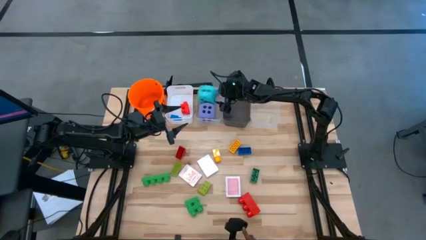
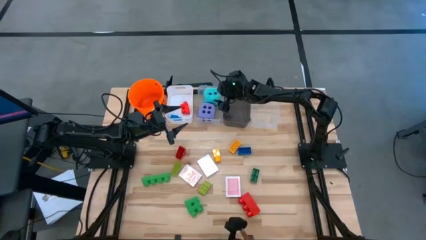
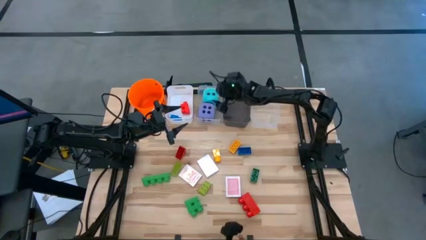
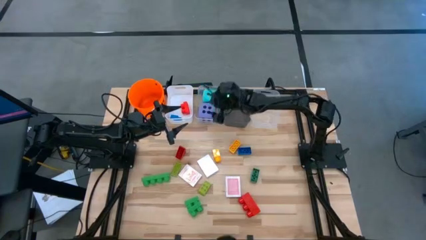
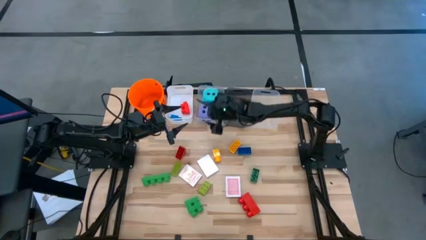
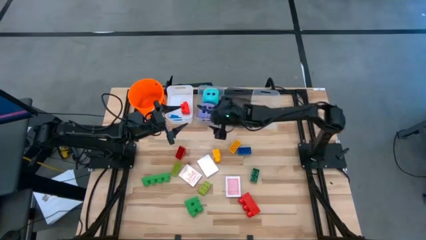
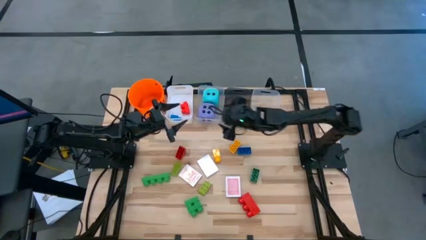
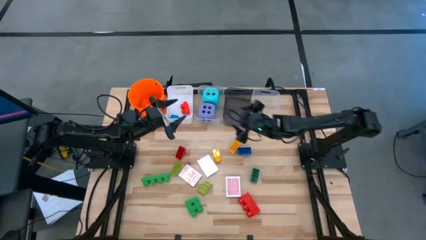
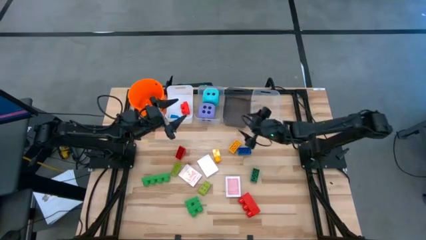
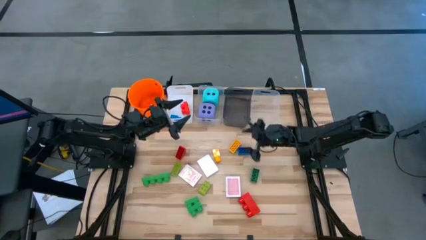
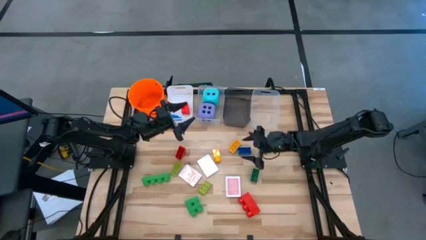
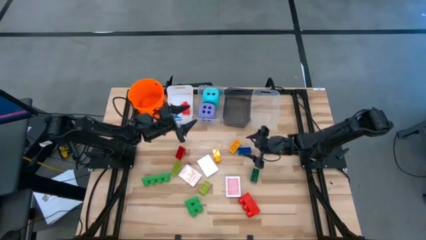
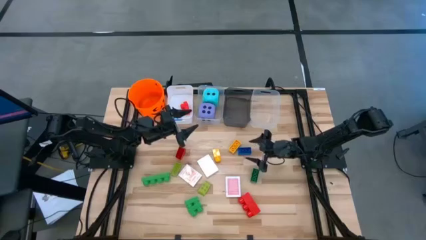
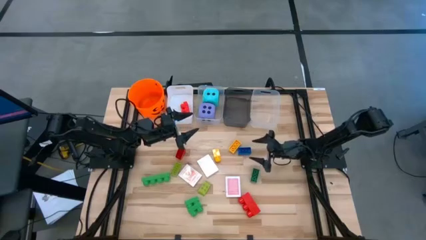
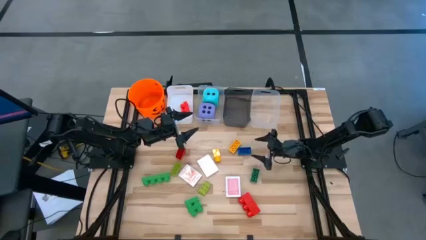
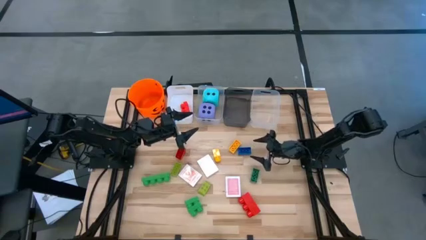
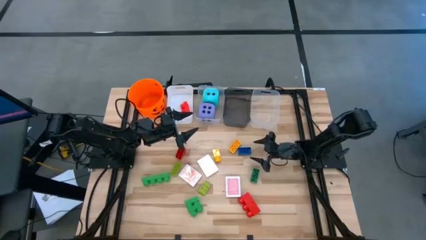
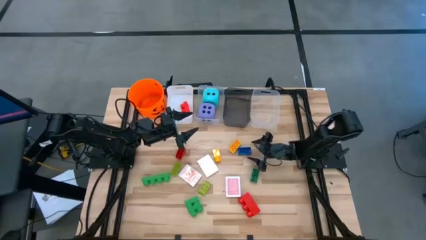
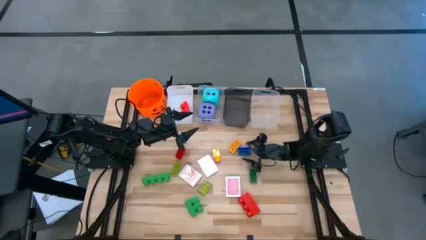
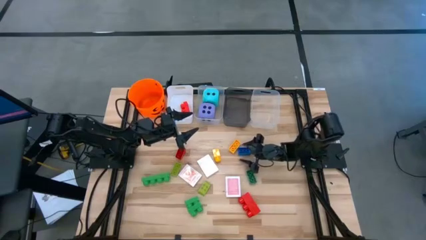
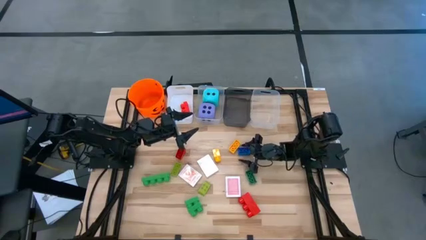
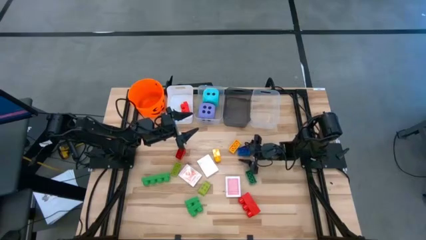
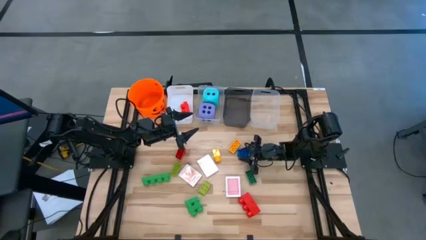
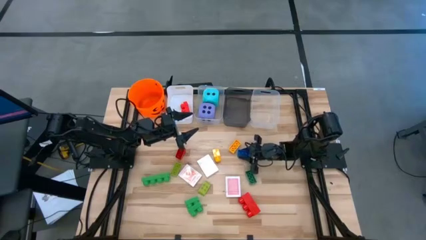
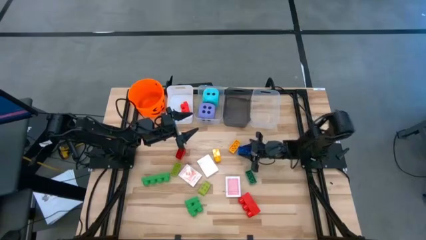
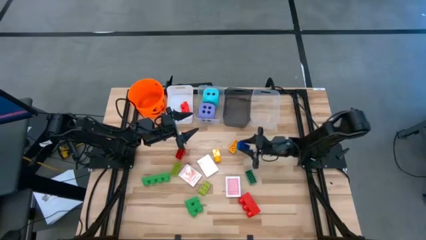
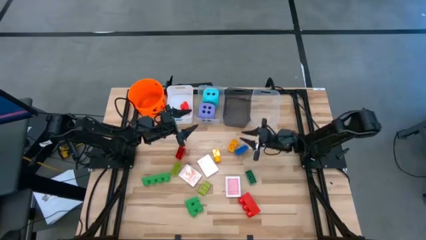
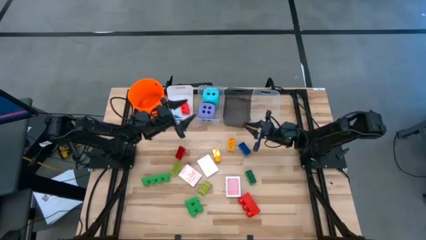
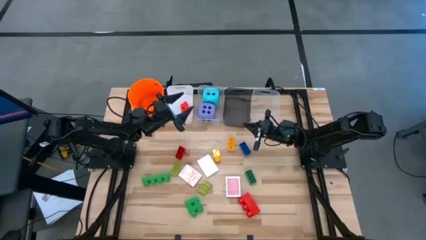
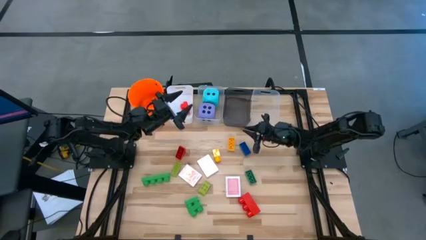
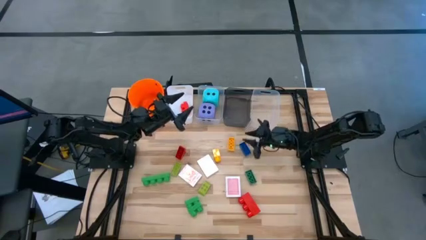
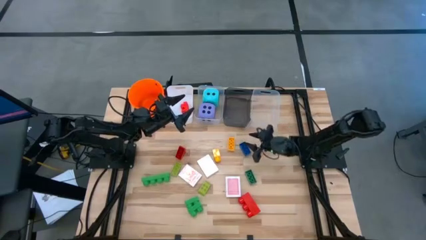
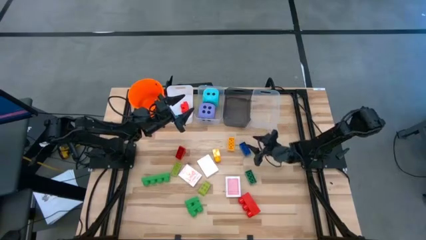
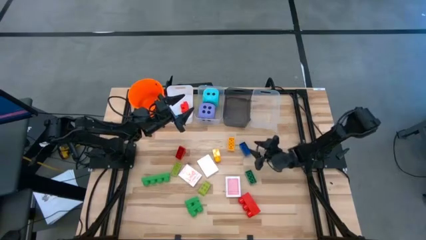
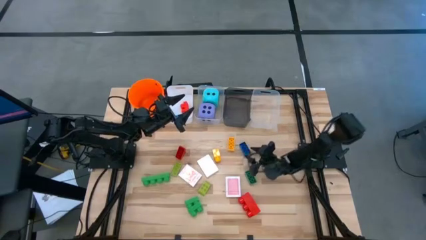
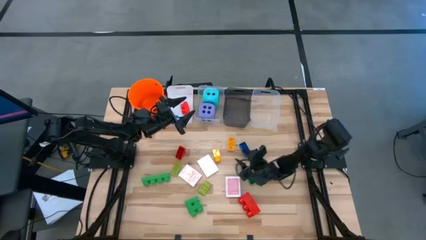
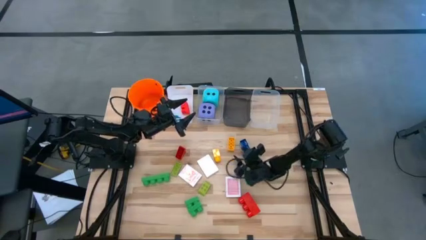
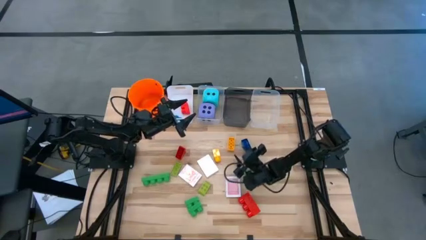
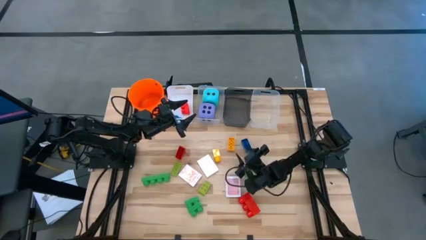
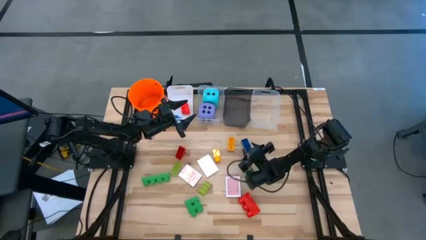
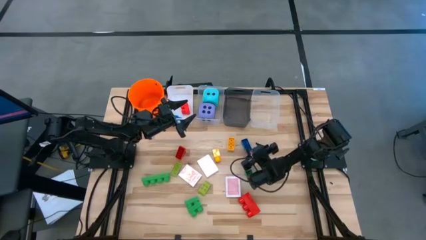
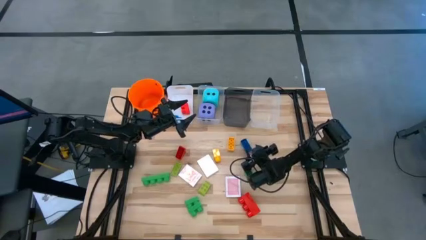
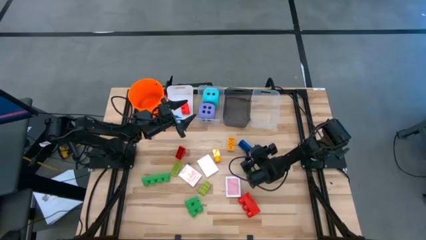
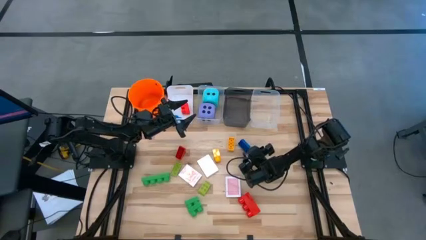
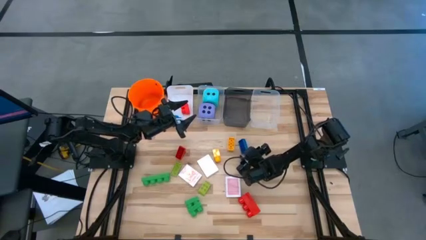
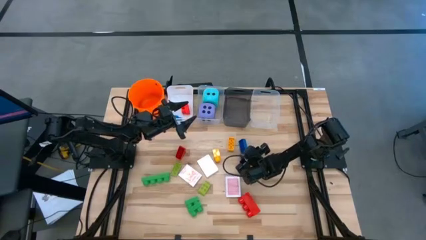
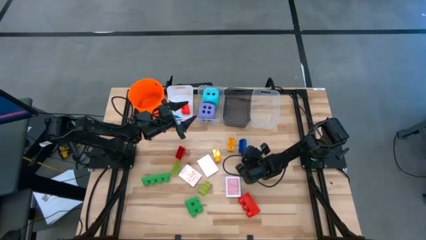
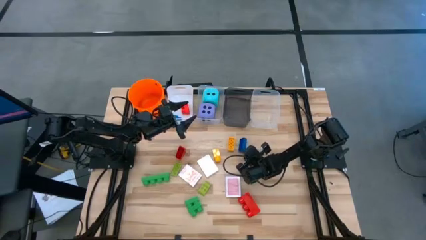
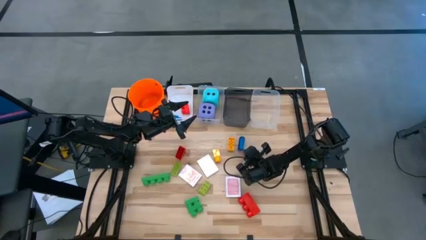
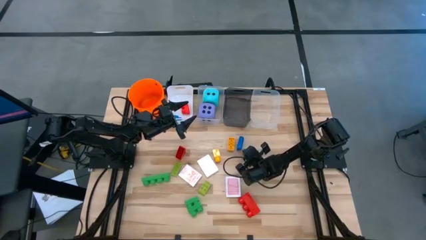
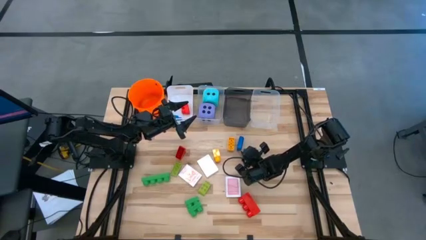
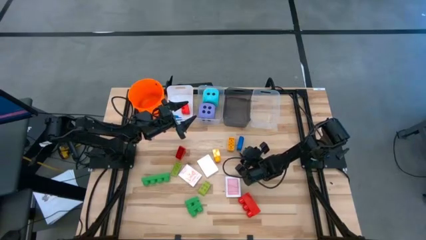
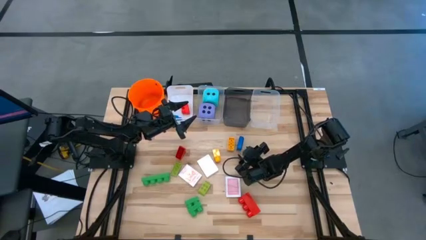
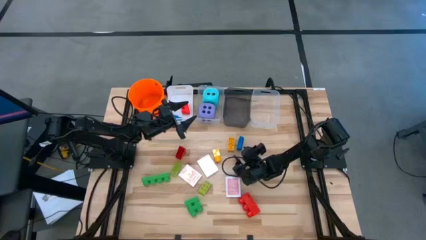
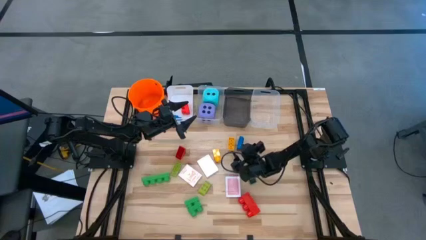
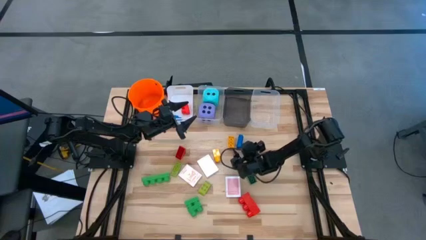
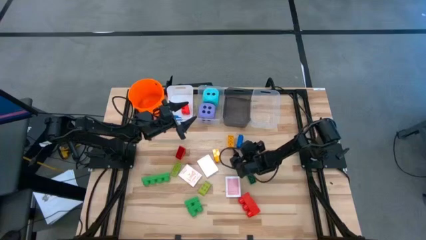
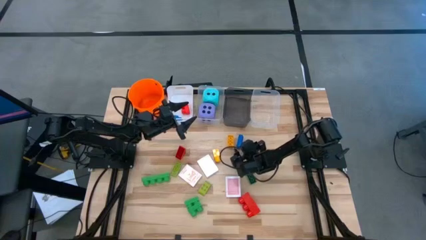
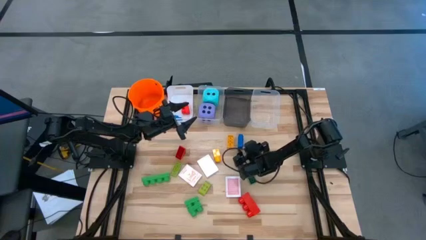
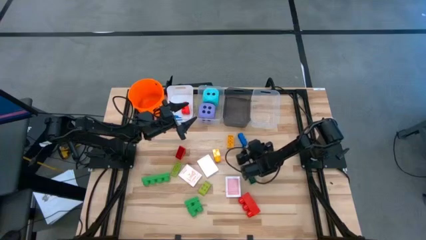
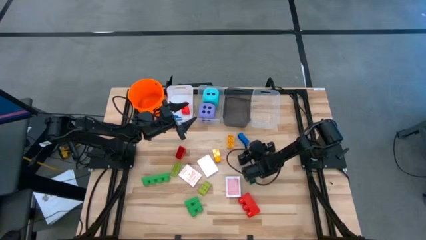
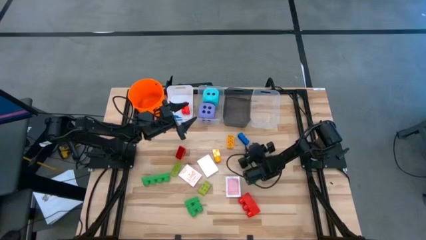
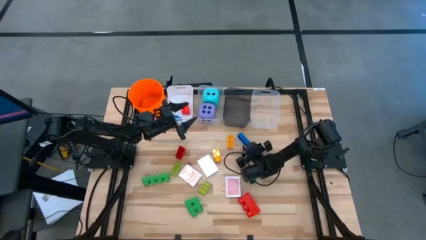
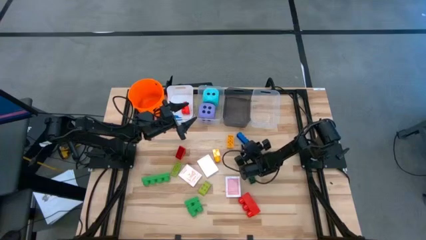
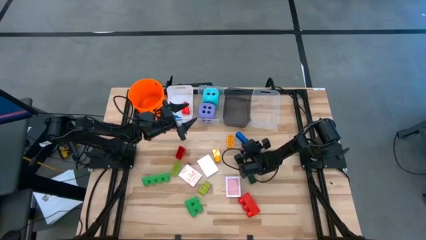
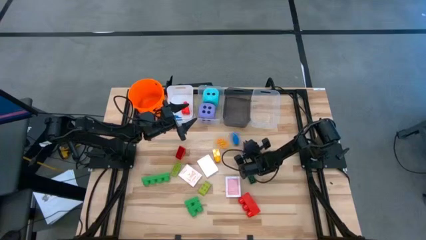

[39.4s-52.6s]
Task: Pick & Place Toys
Put the blue game piece into the black bin

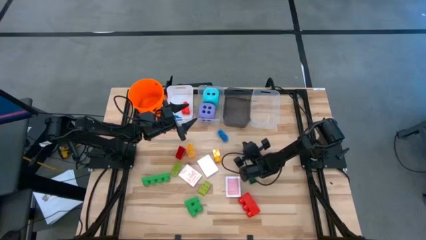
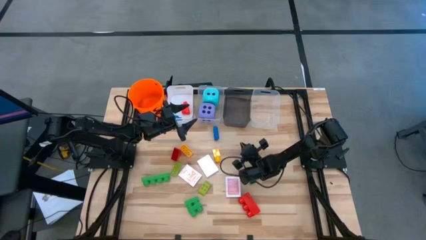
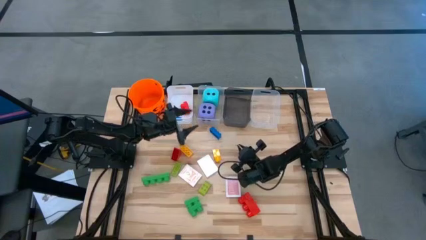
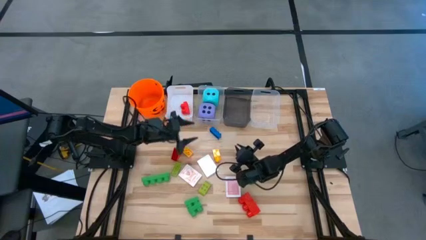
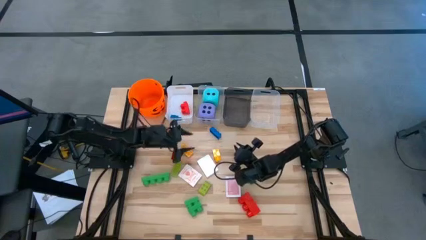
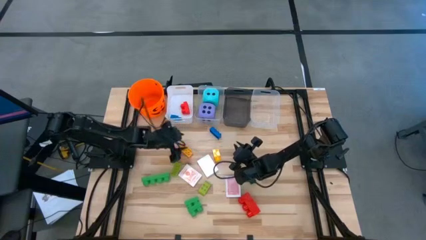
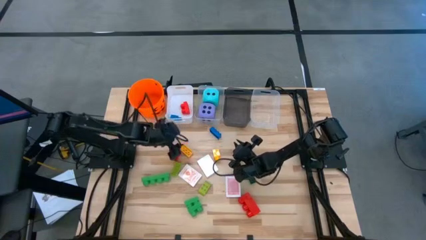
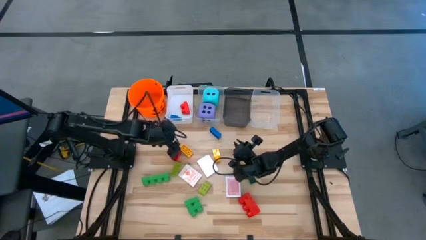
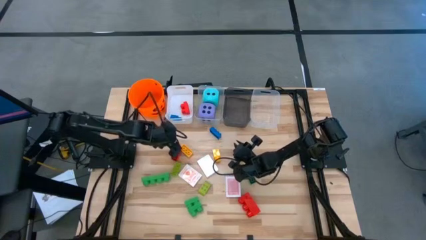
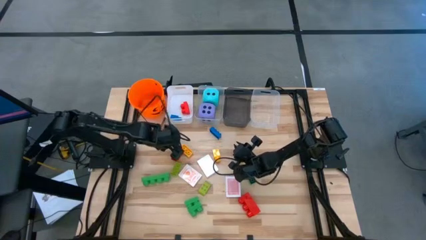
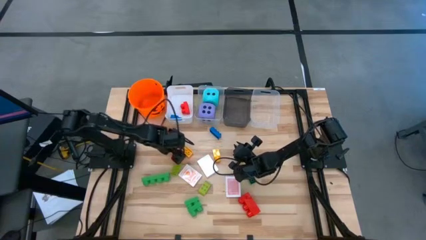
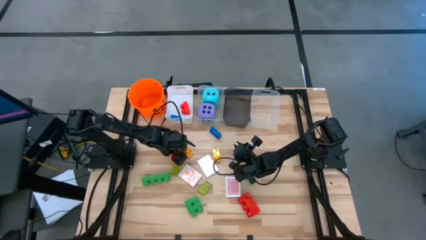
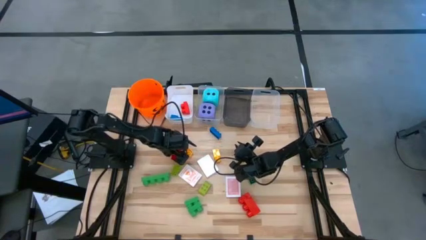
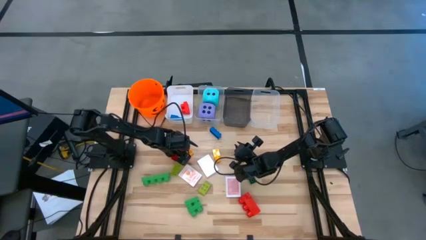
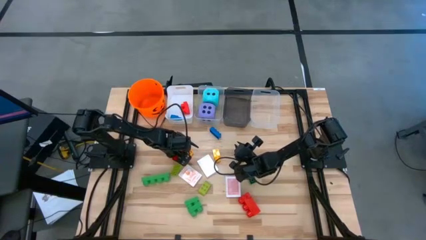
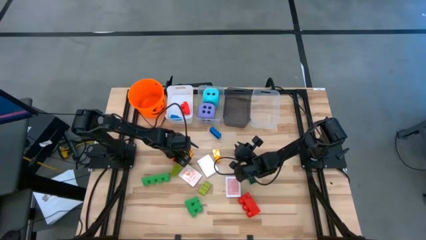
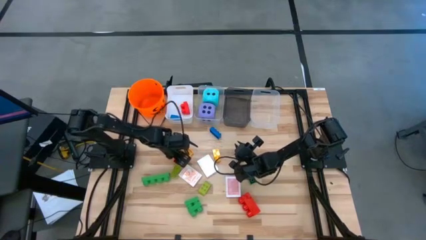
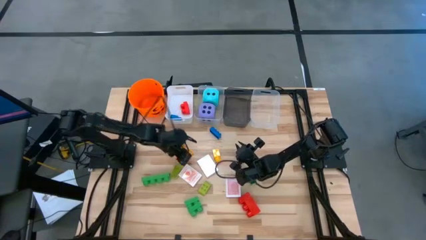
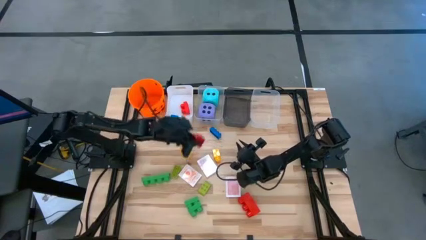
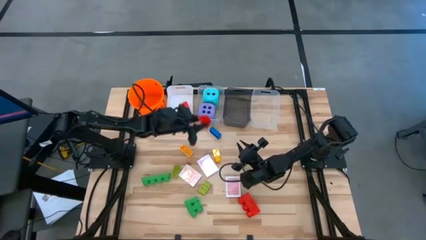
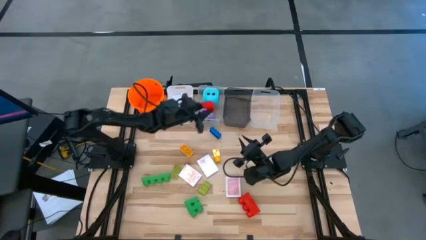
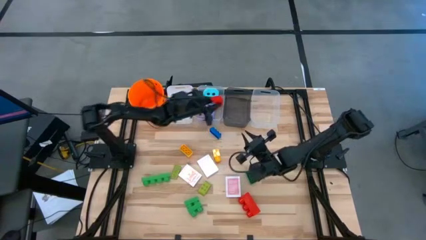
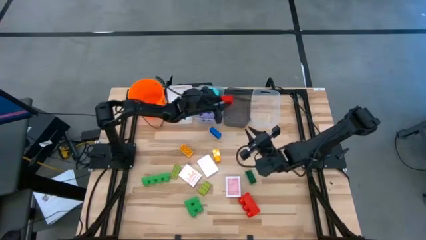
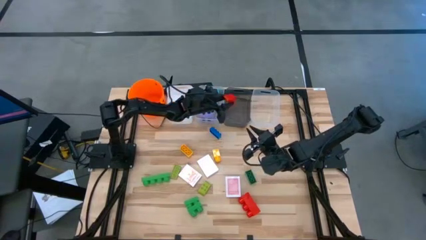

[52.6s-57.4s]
Put the top red game piece into the black bin
